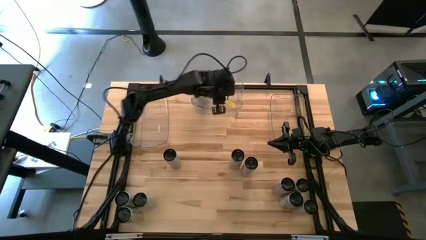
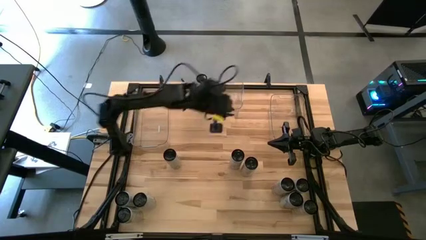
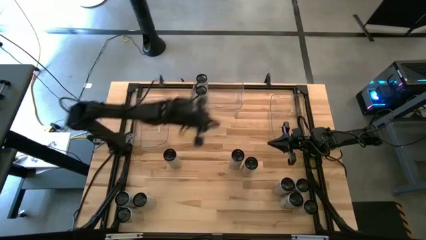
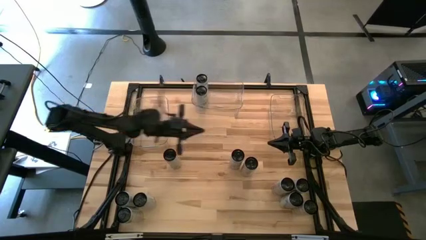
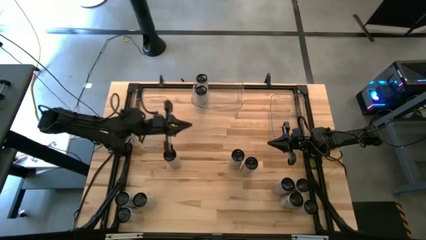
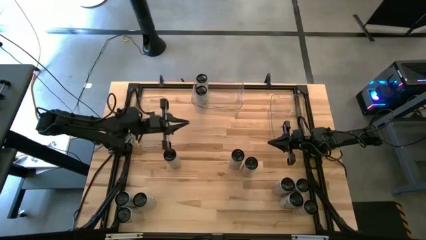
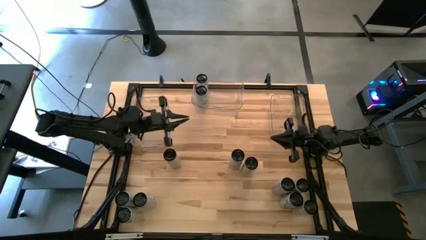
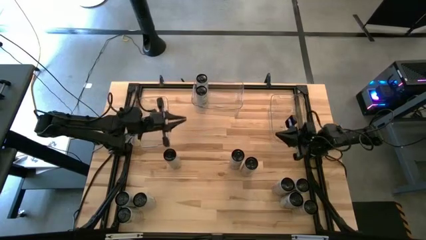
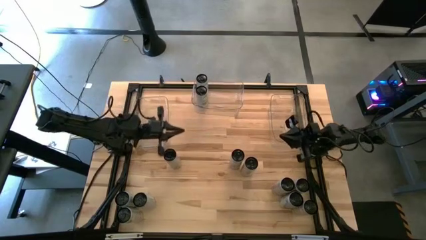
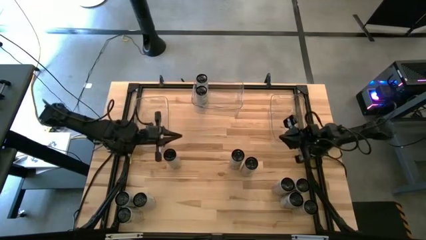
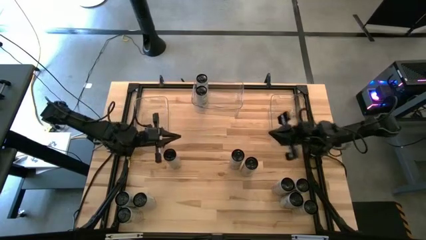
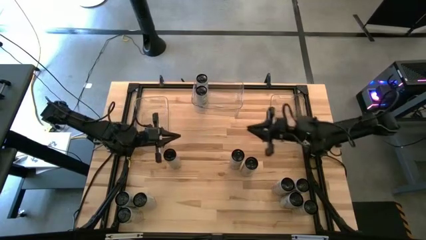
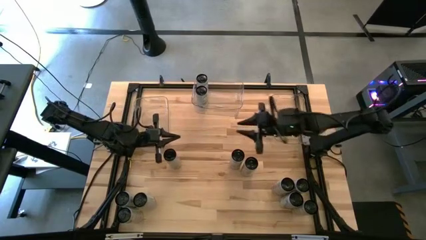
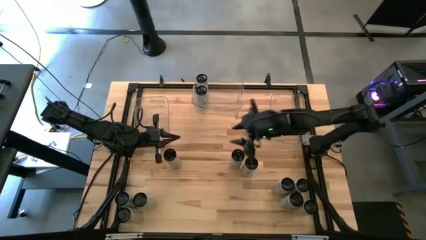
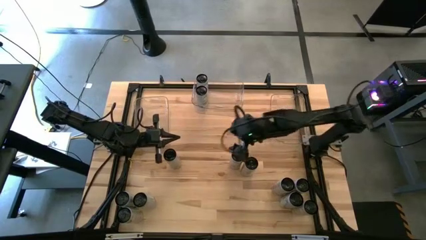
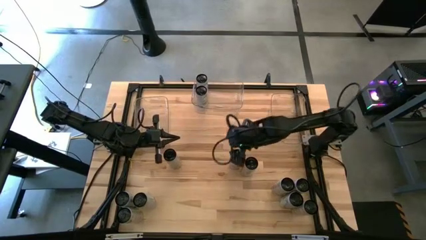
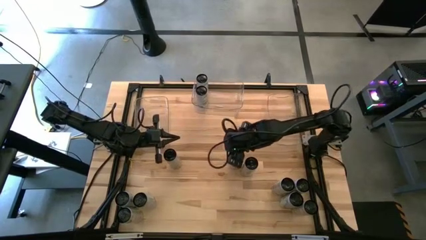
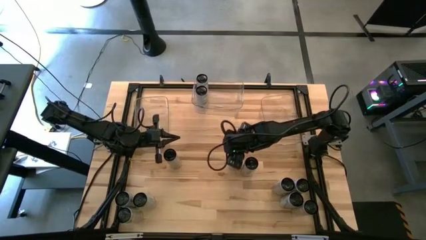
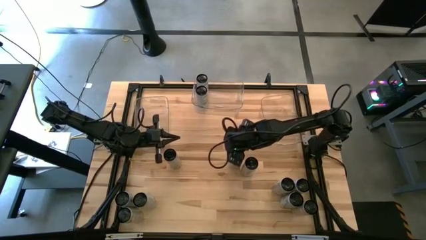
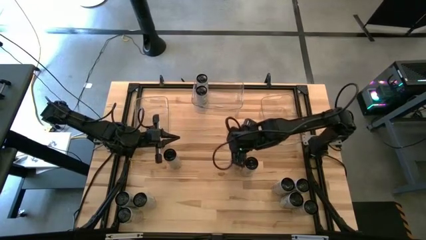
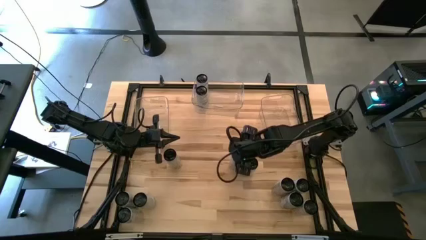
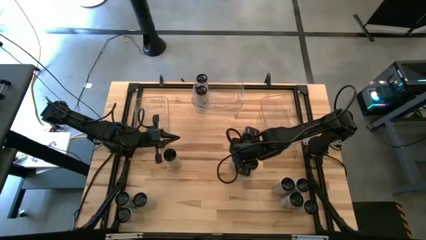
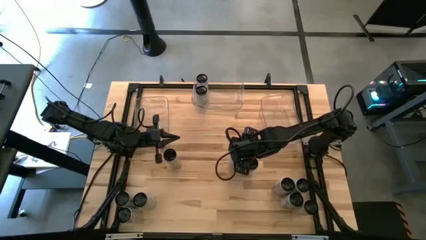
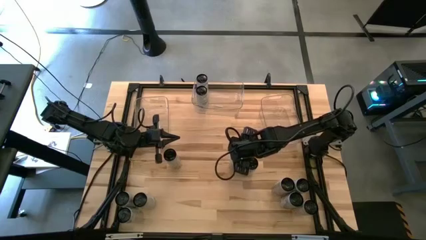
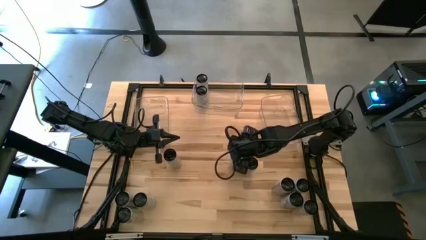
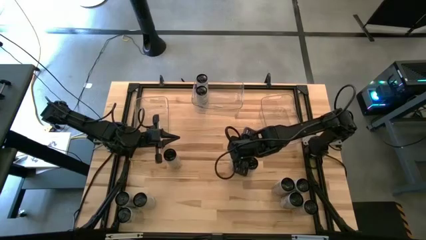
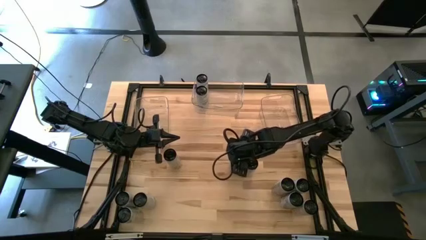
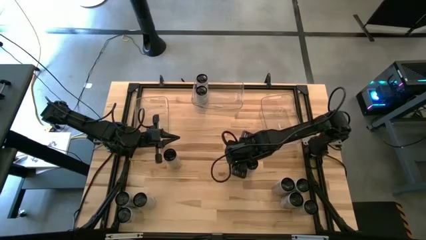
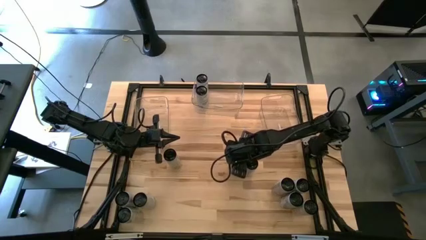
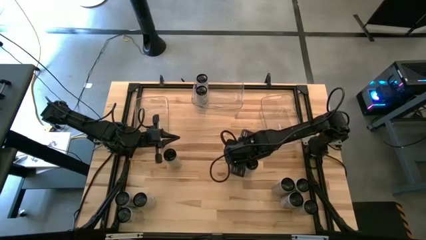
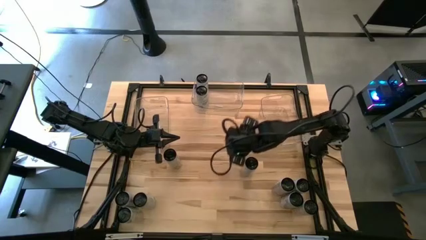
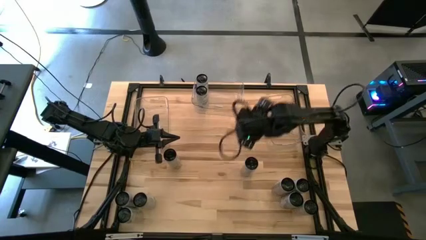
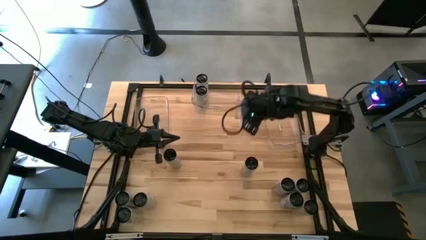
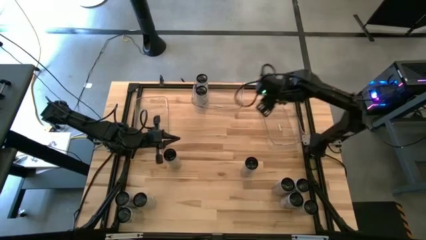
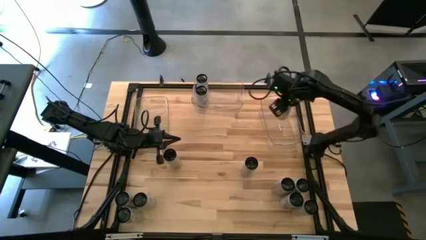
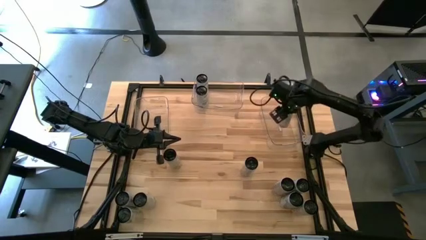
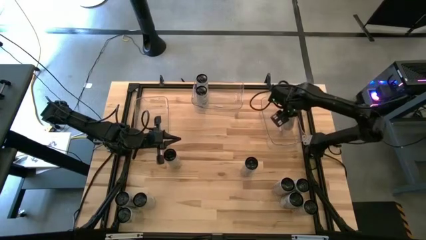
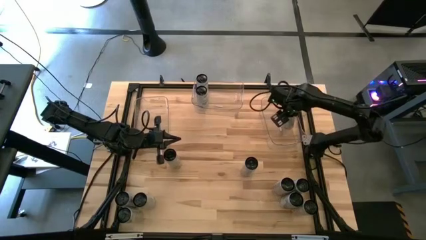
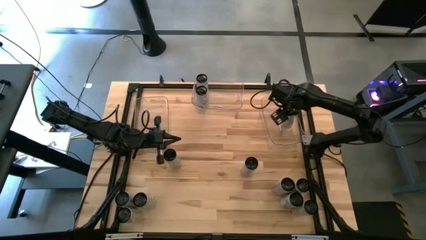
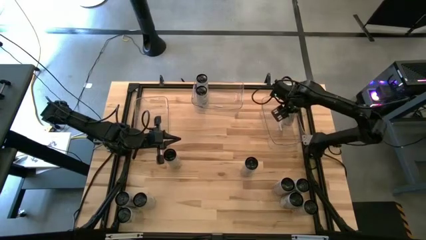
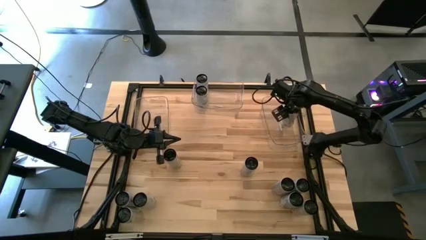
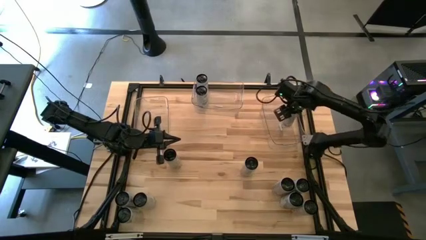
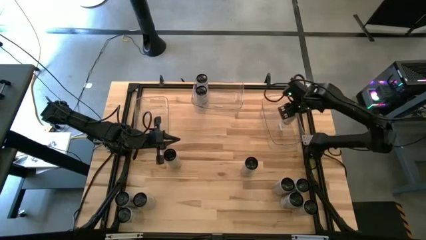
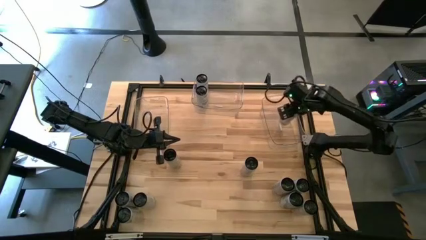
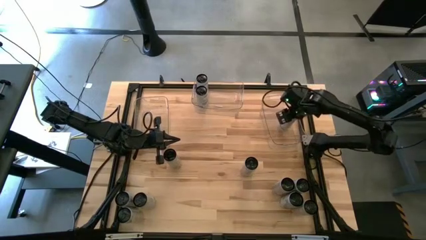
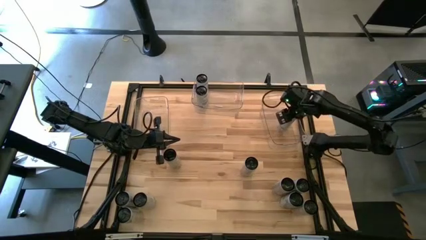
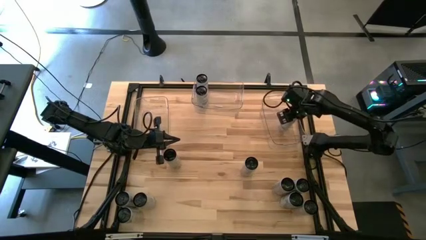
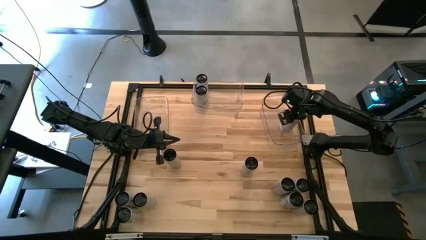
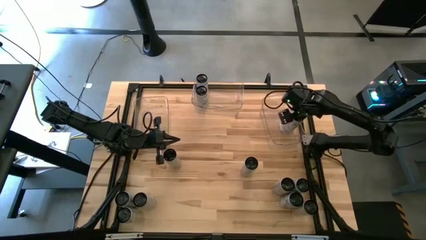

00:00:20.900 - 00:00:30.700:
Task: Sort soda cans
Put the white/pink soda can into the right transparent bin

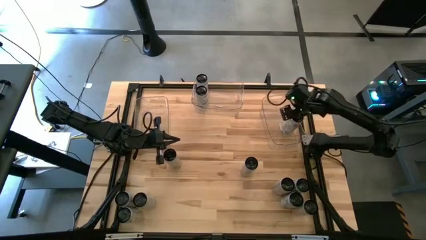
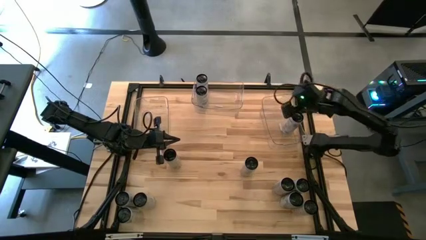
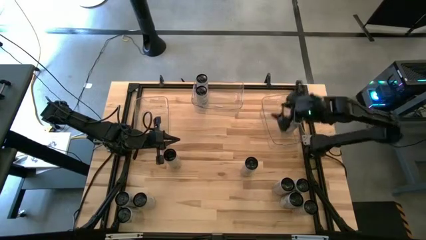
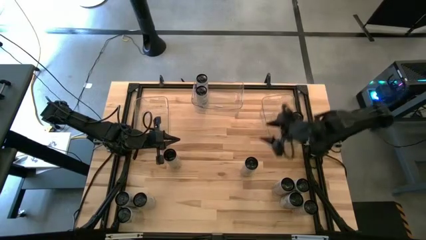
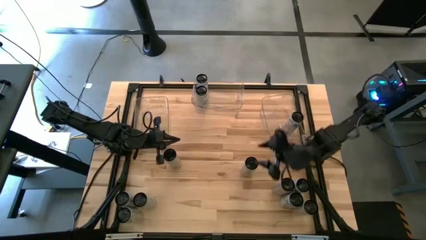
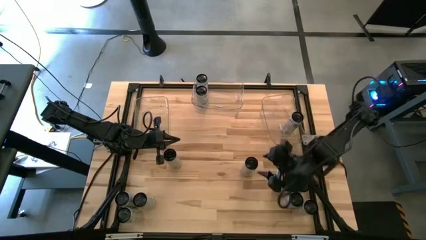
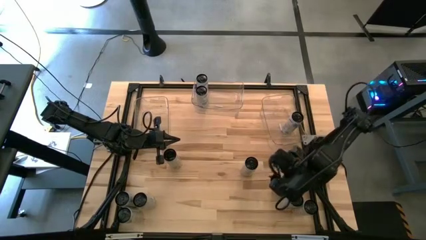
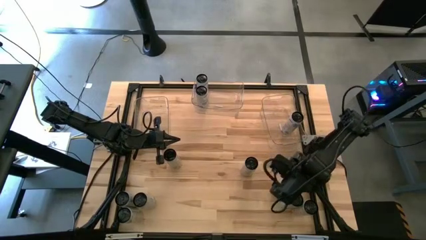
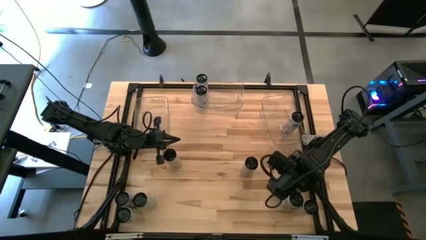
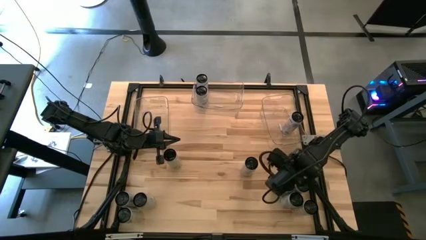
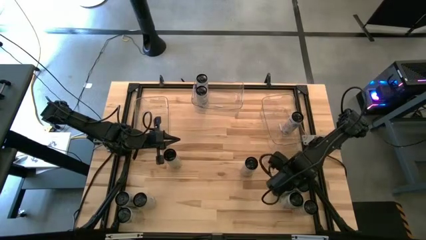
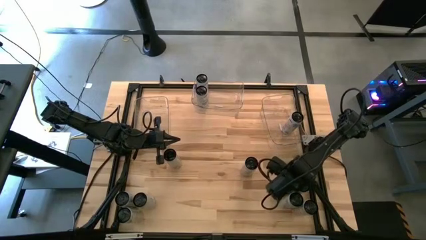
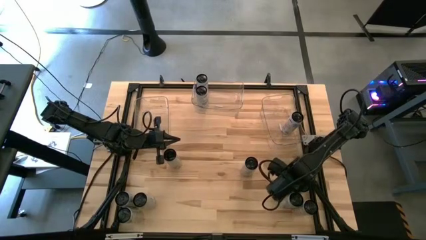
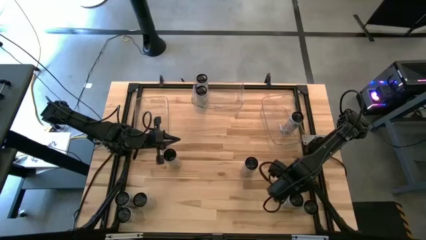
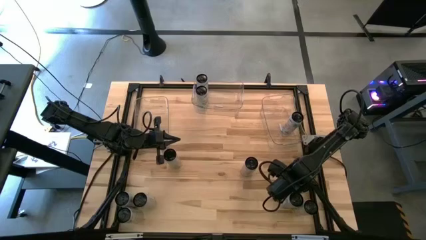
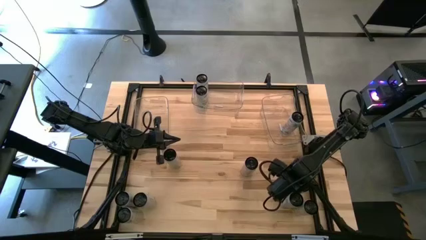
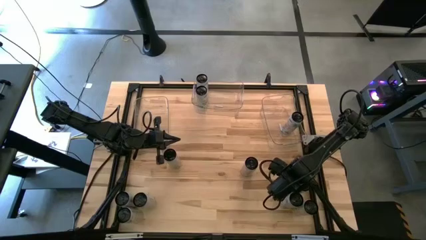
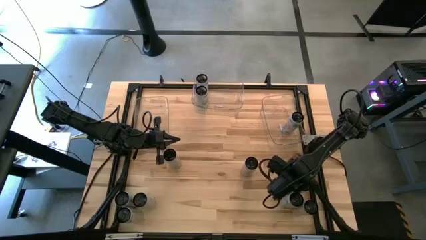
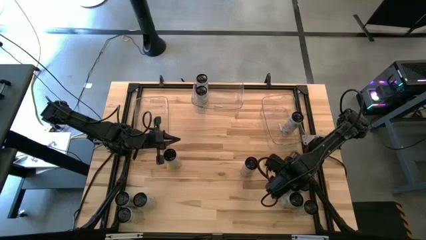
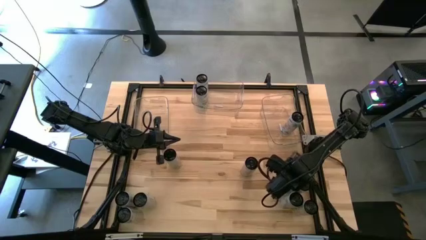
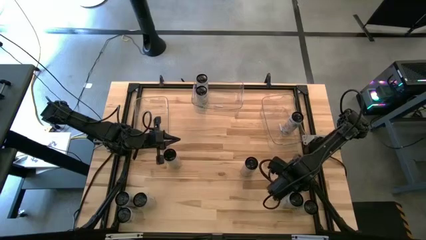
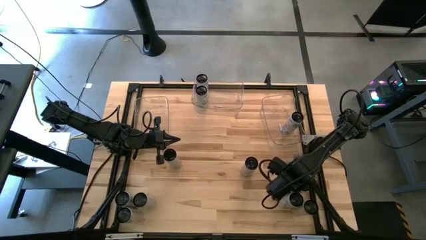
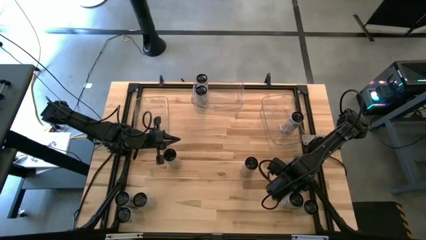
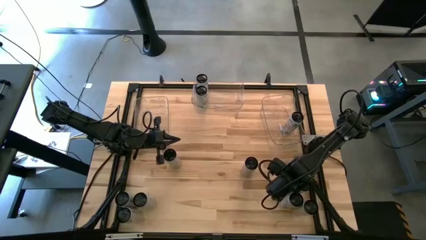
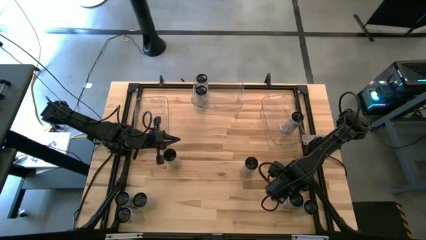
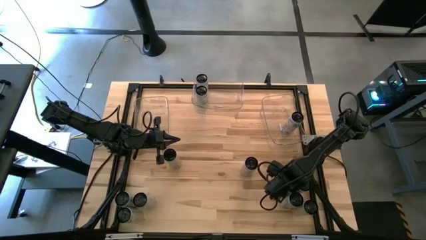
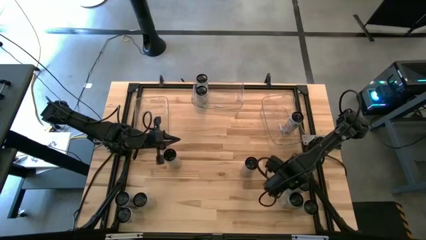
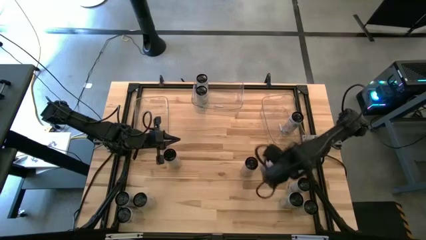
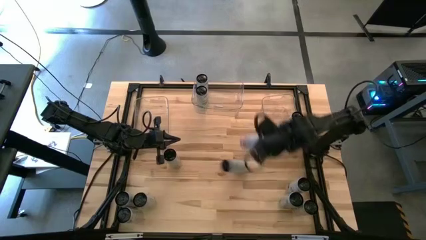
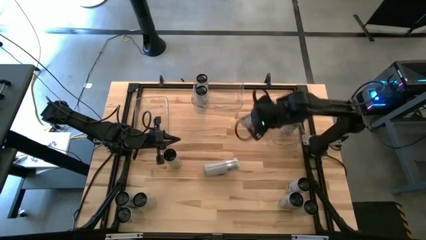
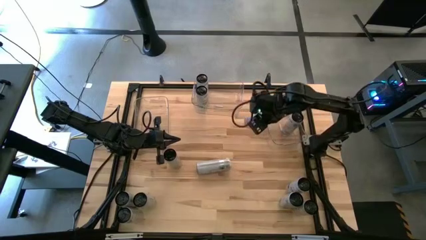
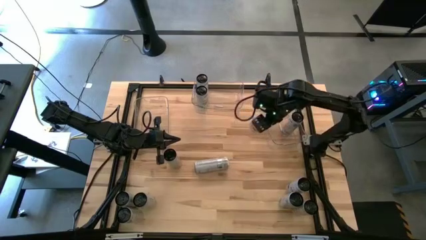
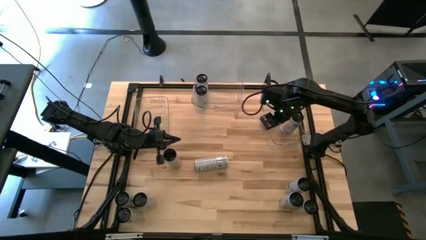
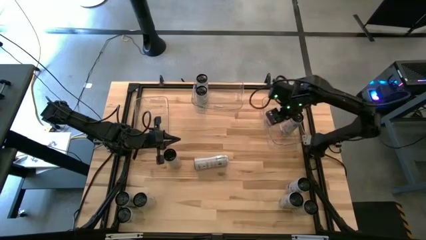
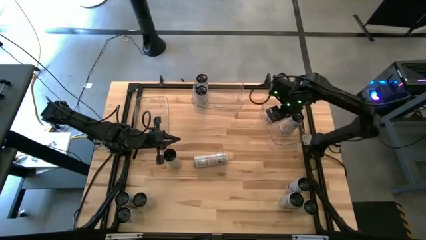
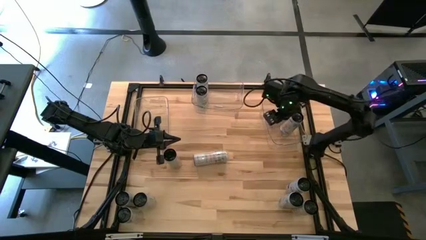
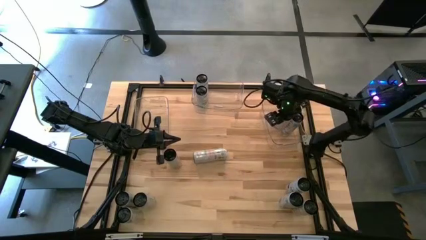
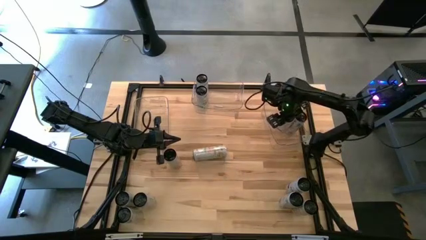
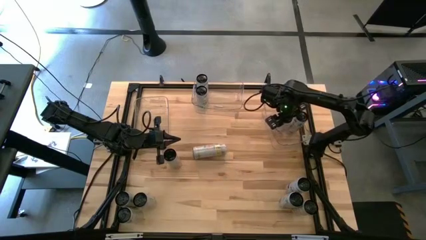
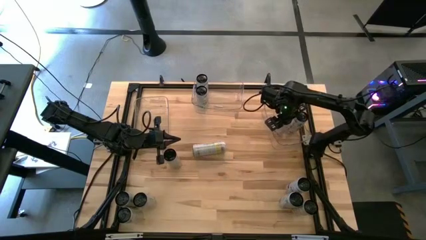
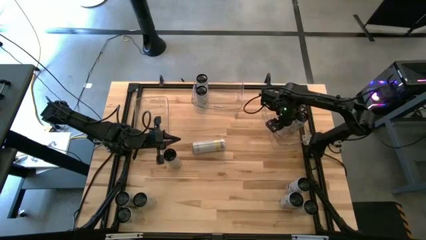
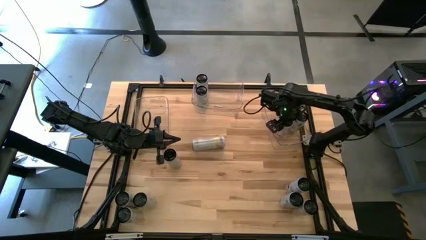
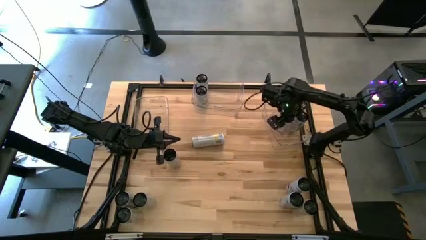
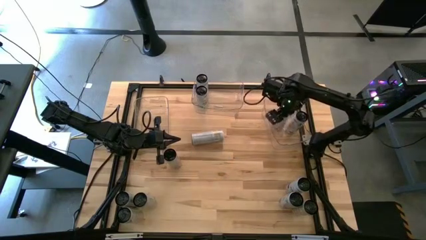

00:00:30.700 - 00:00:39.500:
Put the white/pink soda can into the right transparent bin
